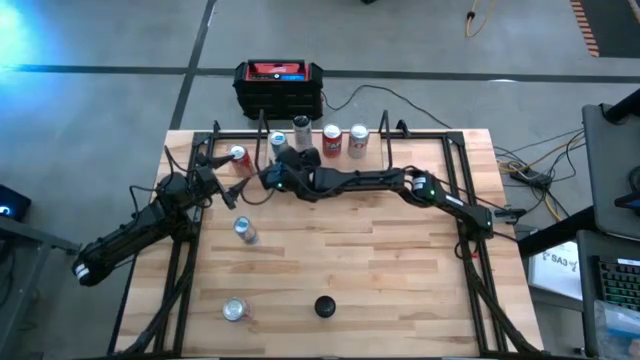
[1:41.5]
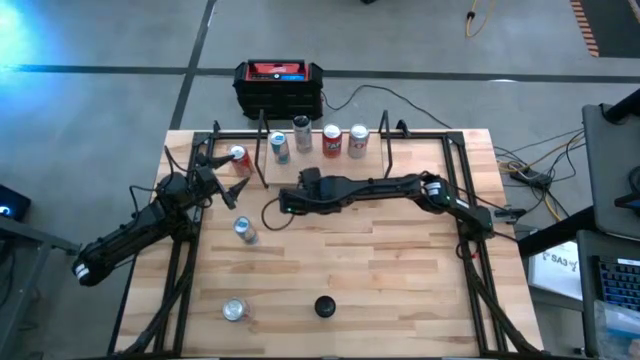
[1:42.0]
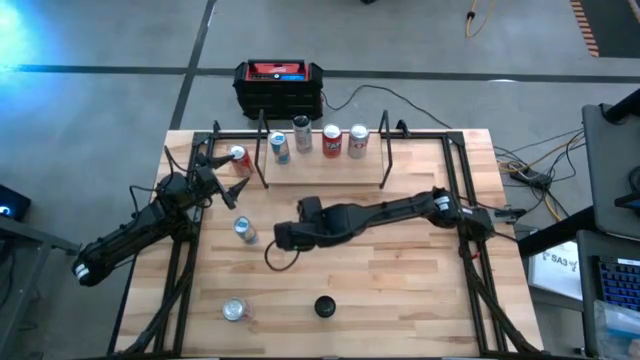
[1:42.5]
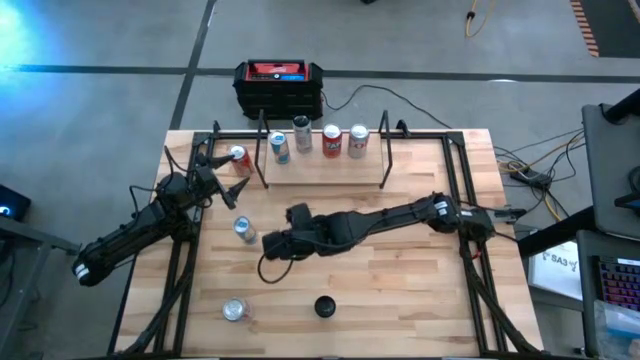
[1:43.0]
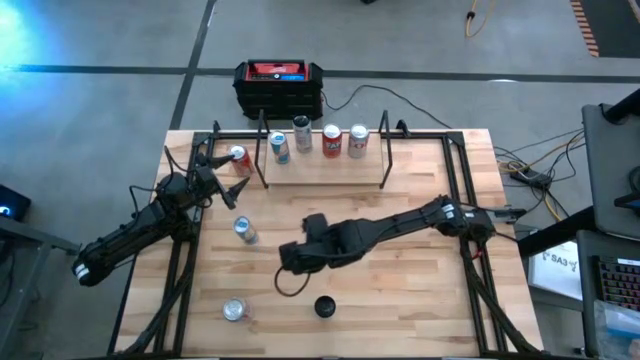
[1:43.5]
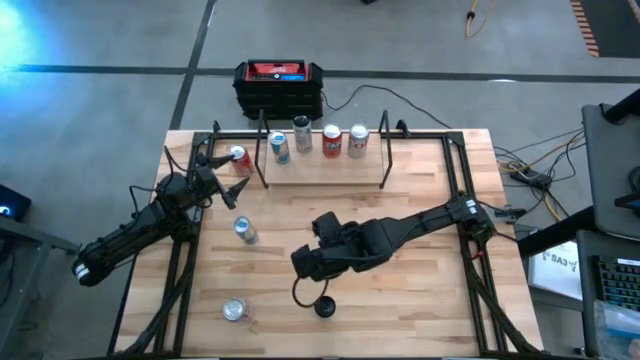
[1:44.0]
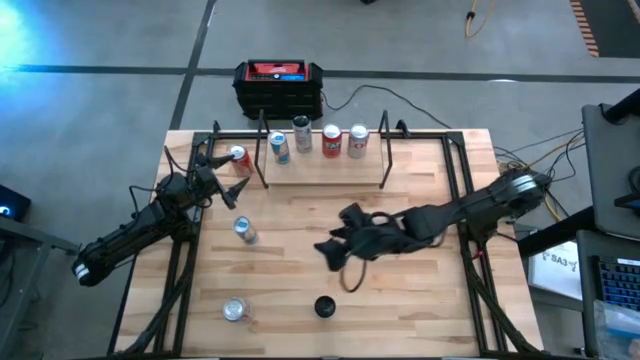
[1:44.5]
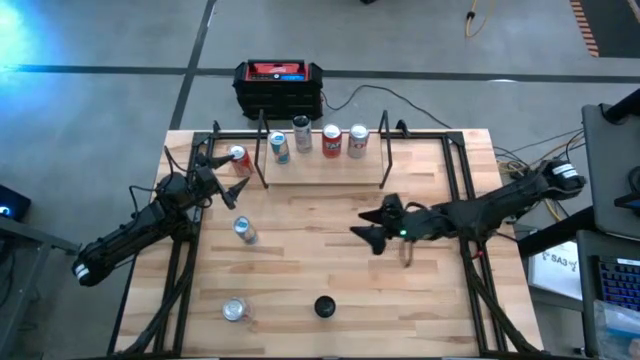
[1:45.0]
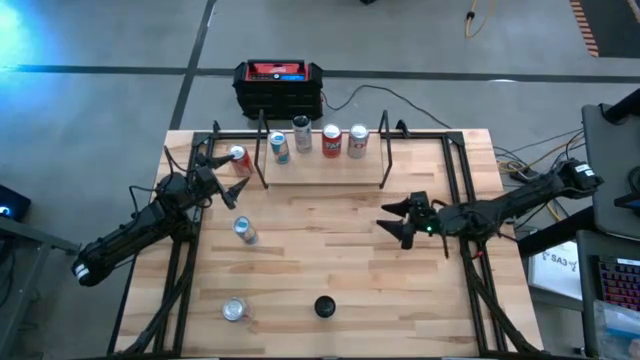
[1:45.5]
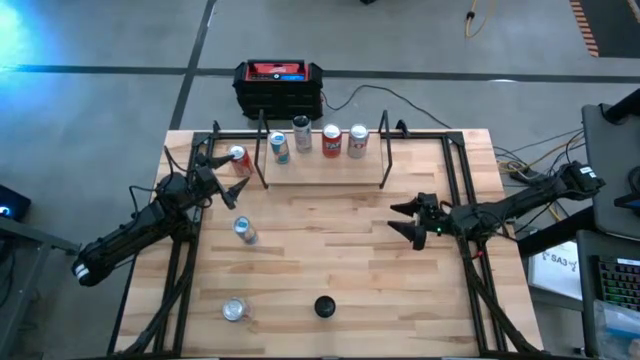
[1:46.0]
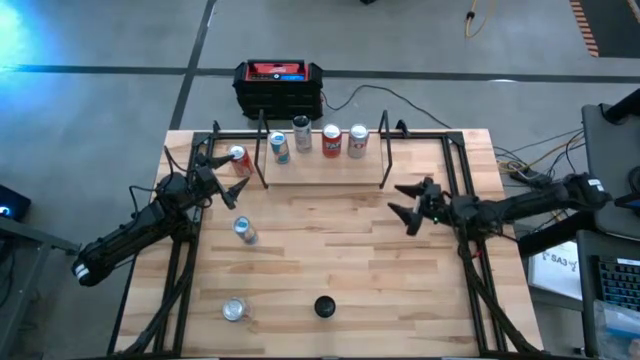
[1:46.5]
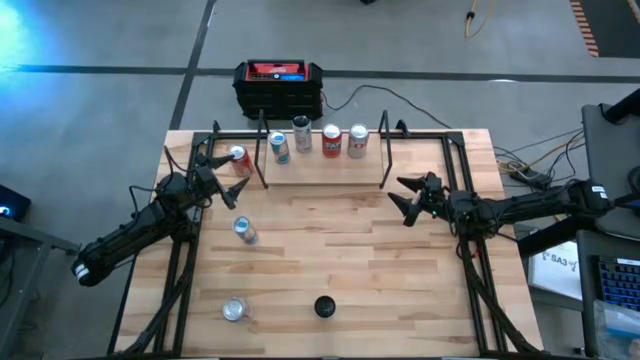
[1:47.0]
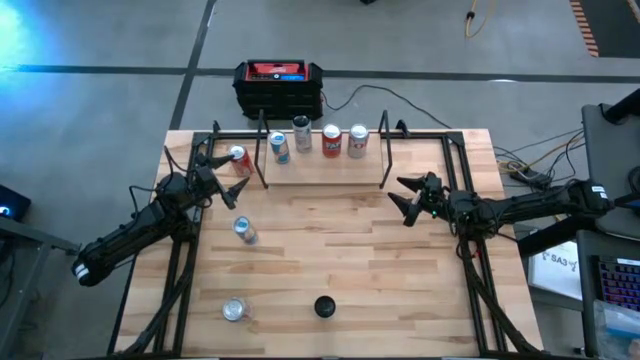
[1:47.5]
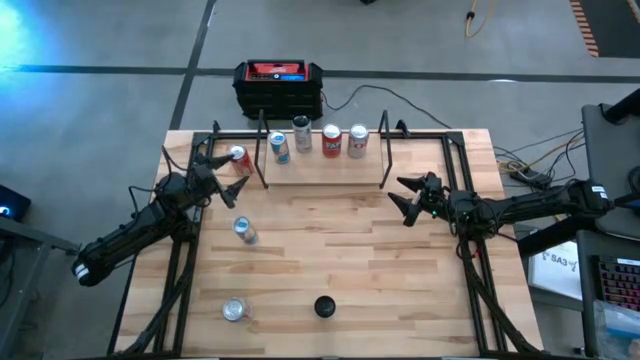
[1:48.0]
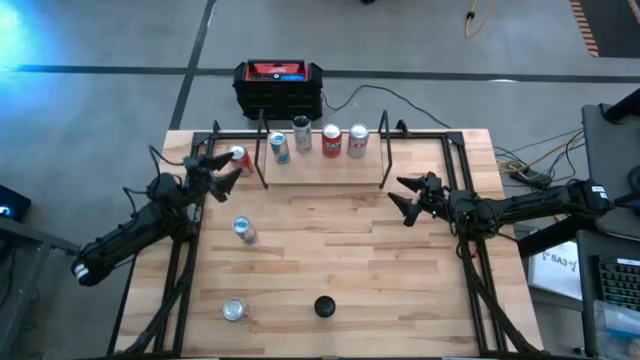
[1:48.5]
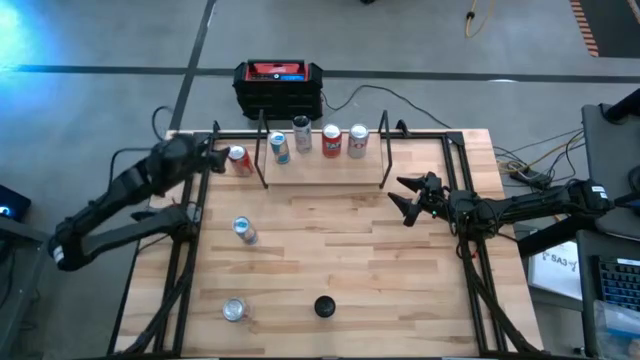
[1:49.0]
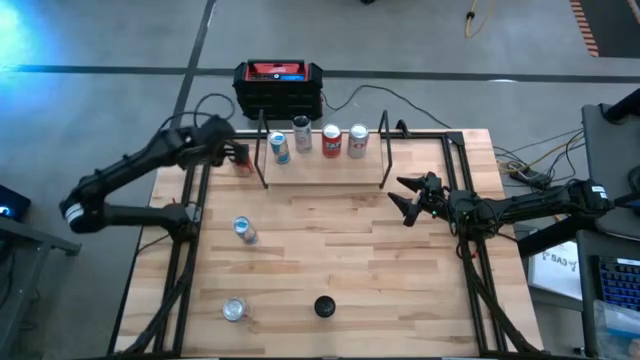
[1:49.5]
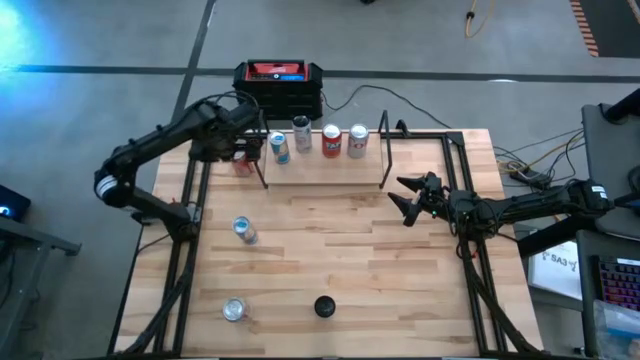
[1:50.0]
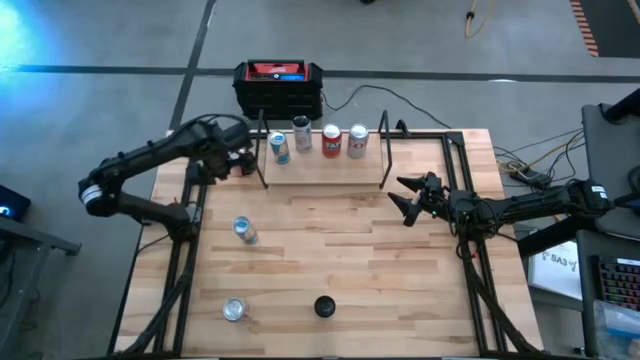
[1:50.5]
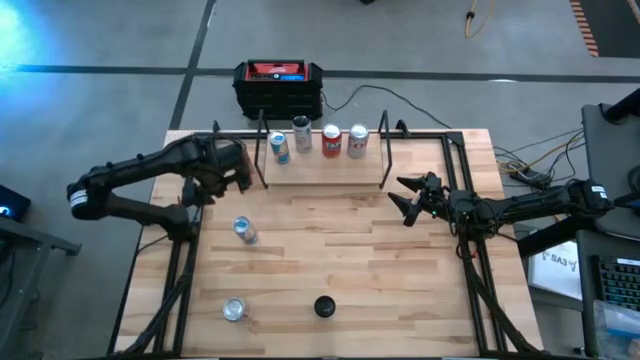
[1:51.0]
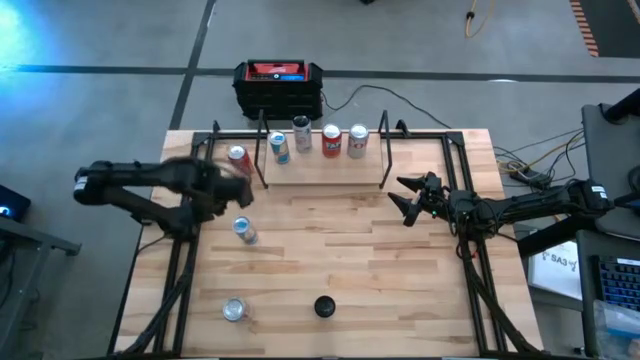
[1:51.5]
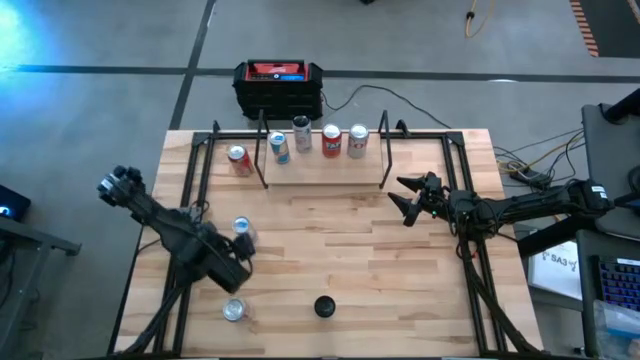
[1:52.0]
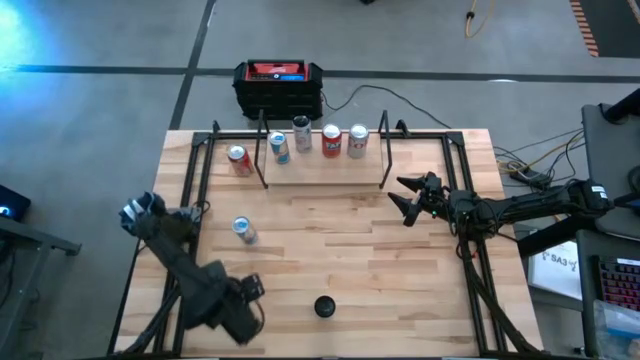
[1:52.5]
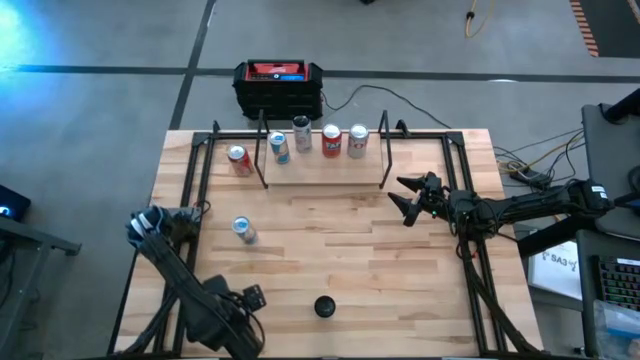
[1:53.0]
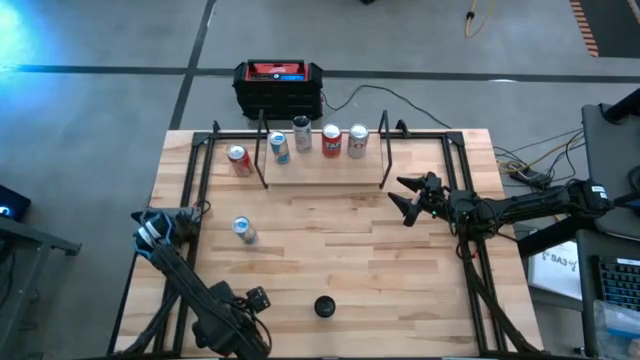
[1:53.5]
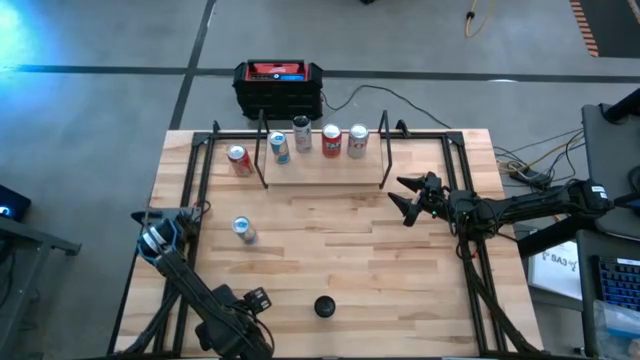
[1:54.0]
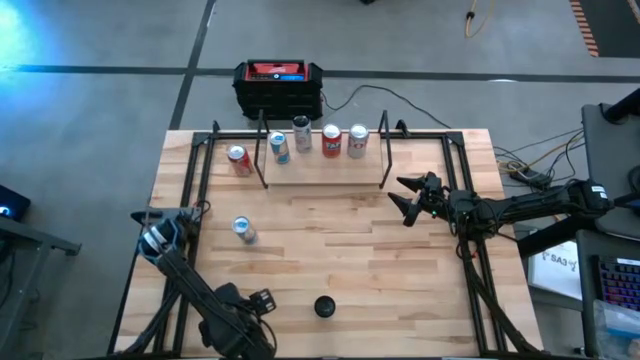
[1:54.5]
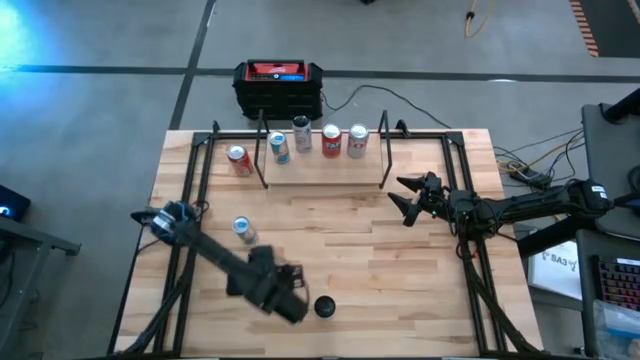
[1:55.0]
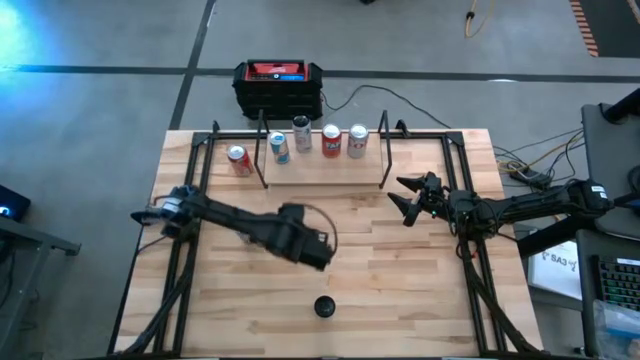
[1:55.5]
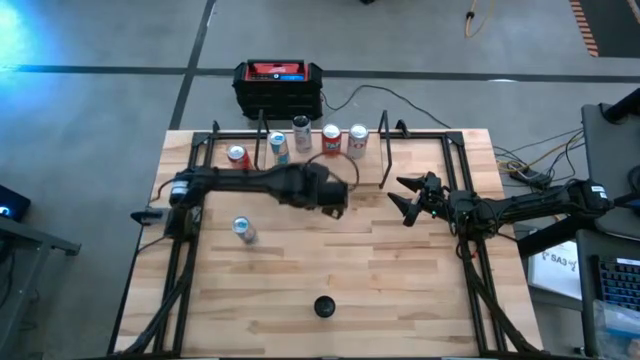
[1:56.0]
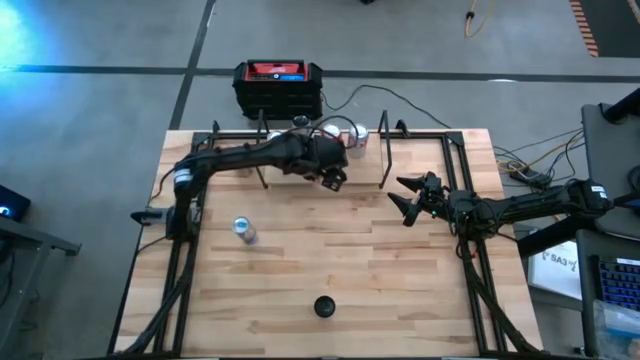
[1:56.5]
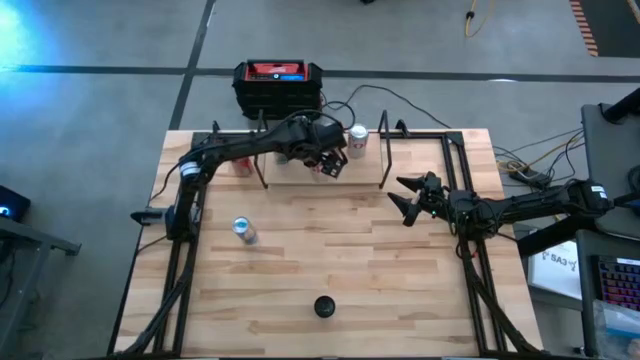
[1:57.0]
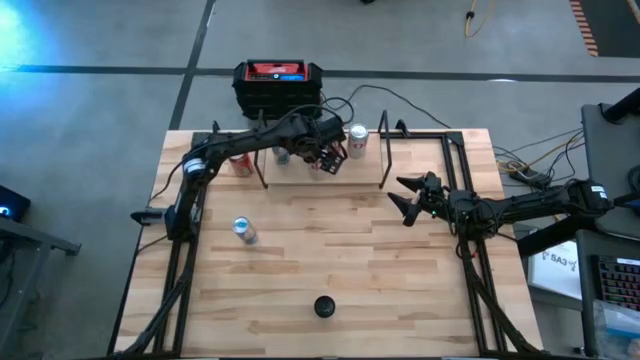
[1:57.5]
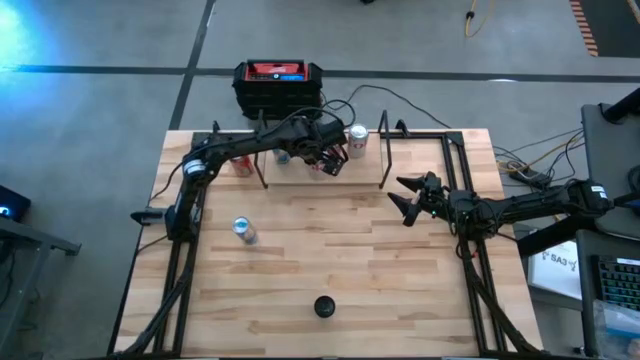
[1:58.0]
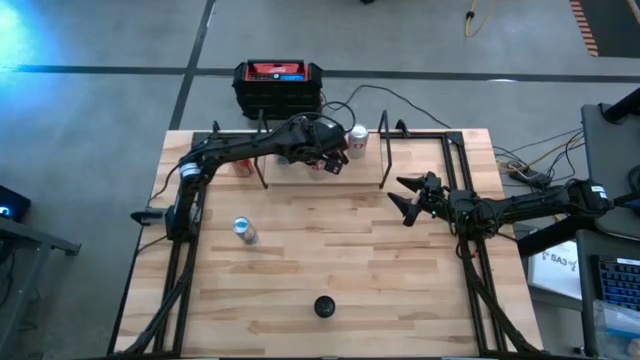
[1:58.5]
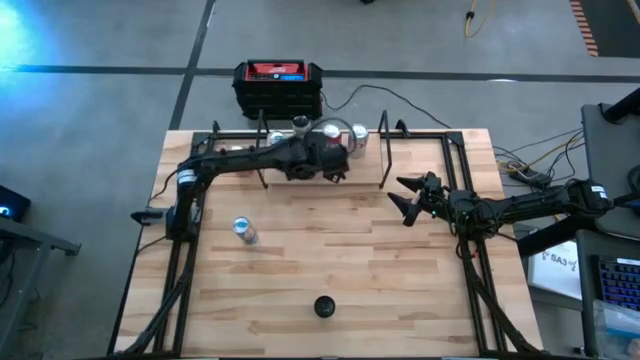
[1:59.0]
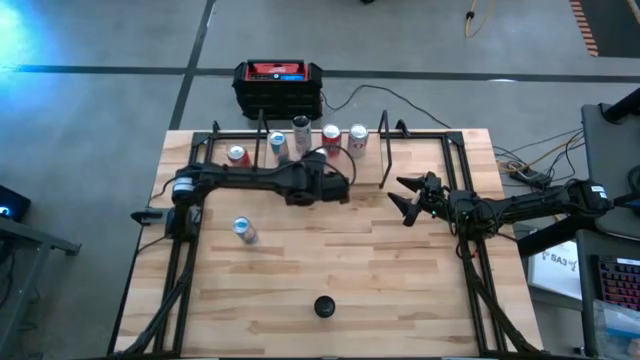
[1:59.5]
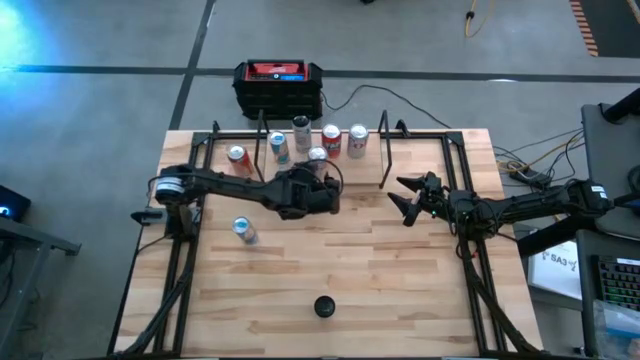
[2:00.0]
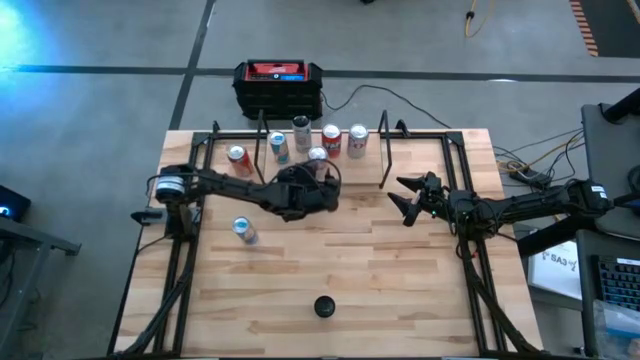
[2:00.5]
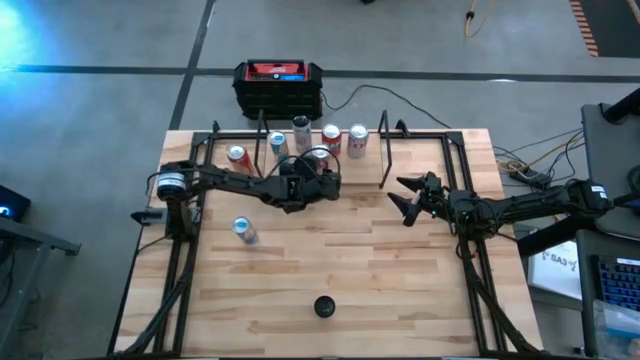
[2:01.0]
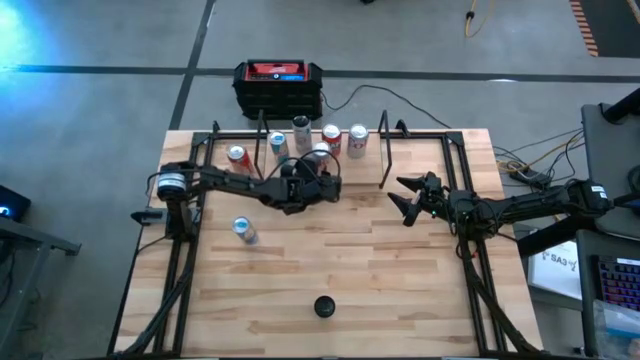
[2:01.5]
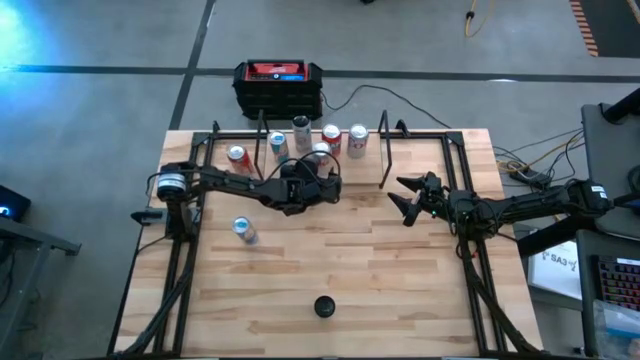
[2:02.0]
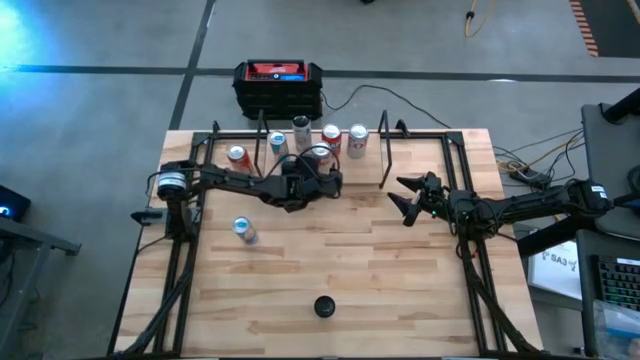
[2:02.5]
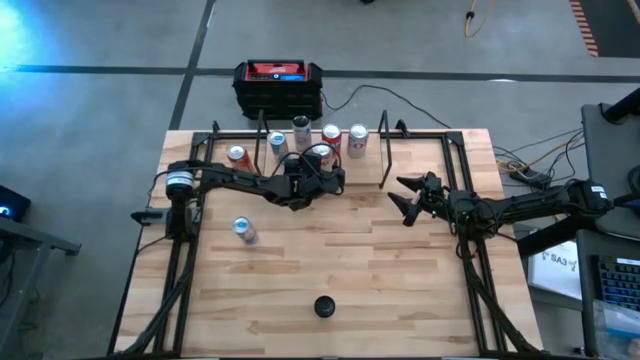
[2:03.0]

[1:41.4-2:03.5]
Task: Place canned beverage on shelf
Put the red and silver soda can on the shelf aligned with the other red and silver soda can
